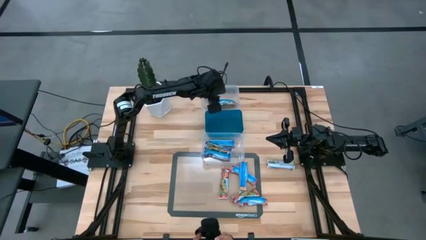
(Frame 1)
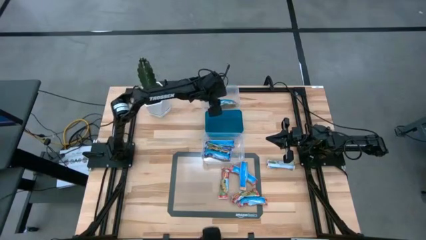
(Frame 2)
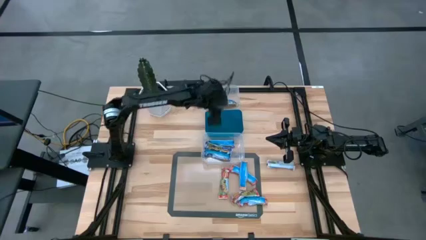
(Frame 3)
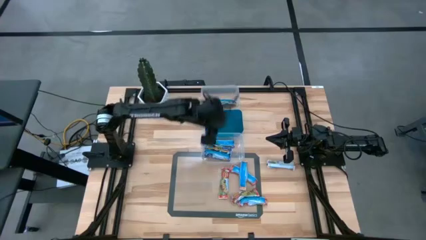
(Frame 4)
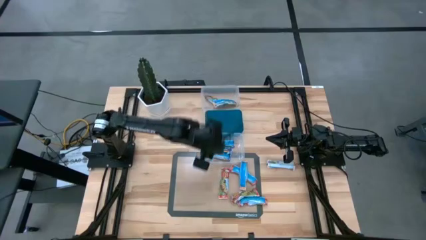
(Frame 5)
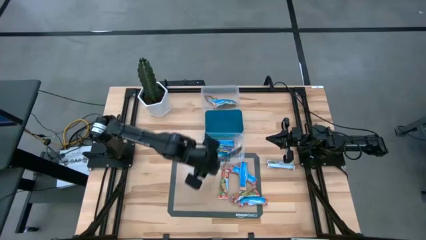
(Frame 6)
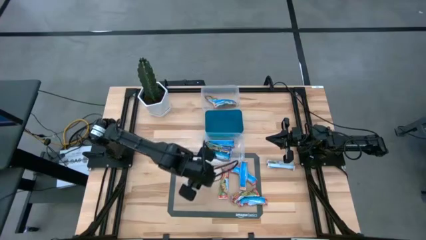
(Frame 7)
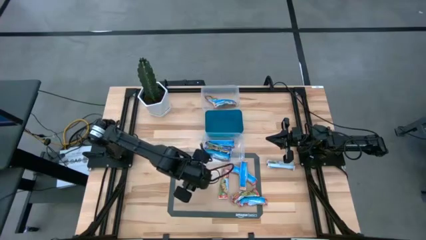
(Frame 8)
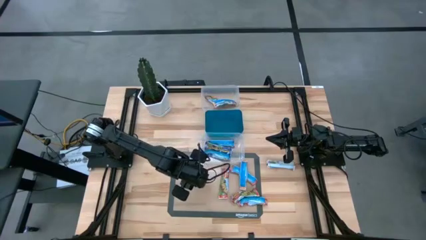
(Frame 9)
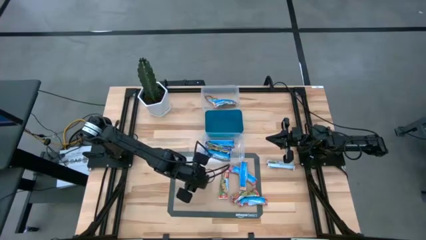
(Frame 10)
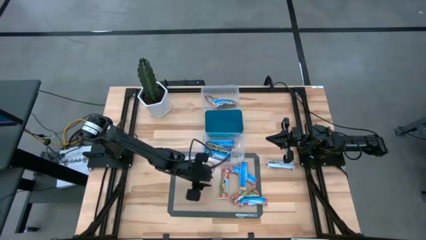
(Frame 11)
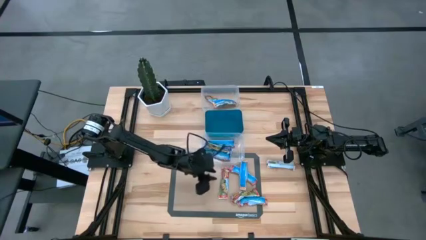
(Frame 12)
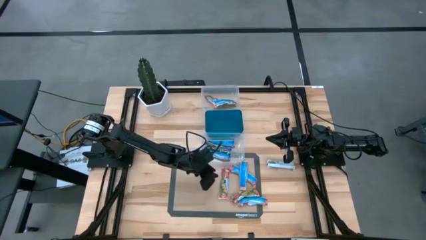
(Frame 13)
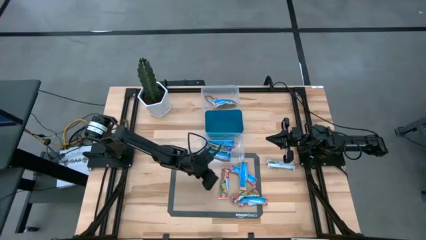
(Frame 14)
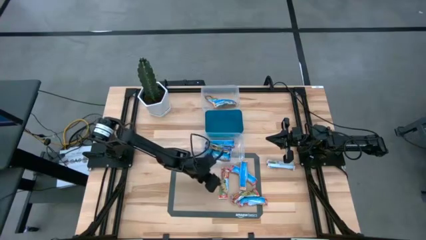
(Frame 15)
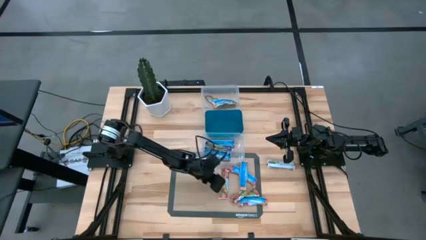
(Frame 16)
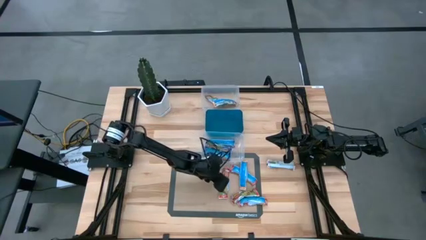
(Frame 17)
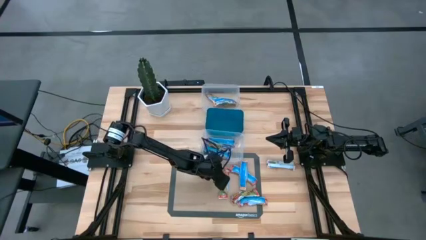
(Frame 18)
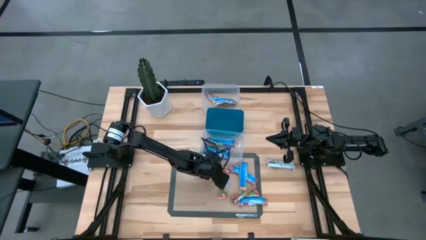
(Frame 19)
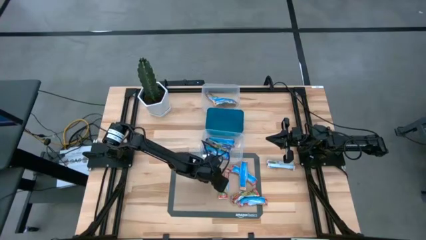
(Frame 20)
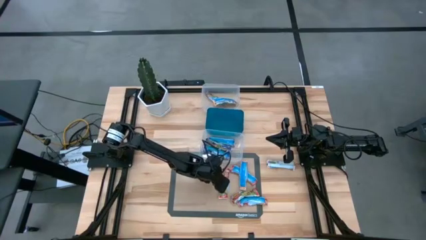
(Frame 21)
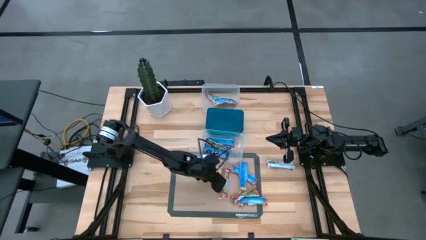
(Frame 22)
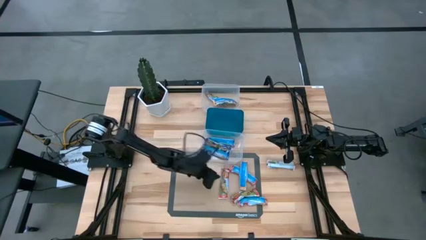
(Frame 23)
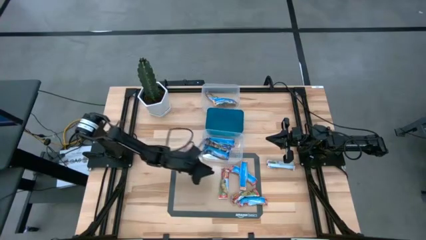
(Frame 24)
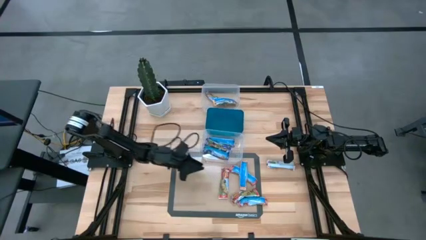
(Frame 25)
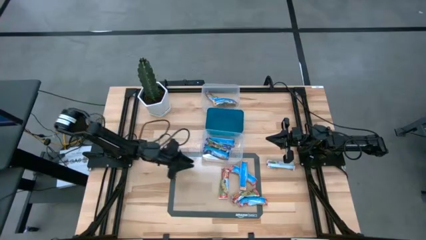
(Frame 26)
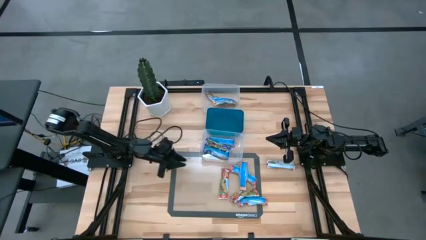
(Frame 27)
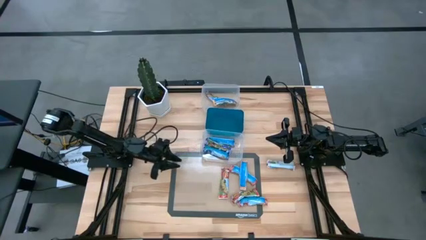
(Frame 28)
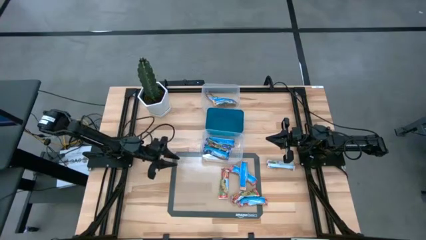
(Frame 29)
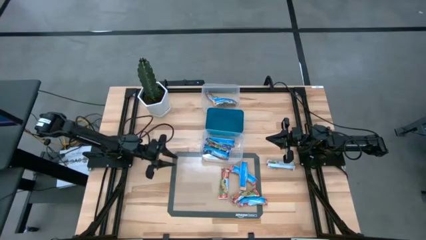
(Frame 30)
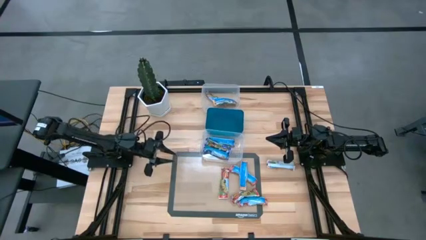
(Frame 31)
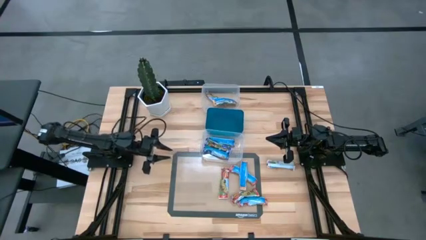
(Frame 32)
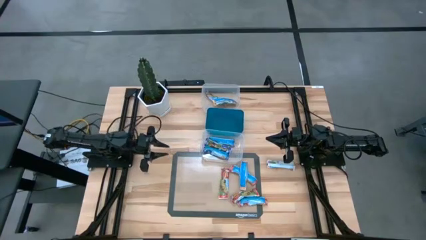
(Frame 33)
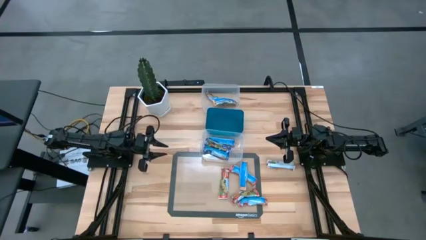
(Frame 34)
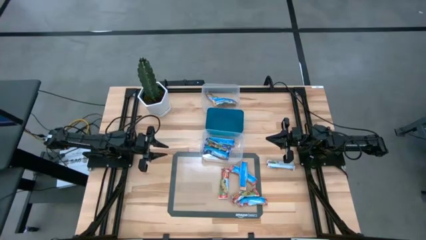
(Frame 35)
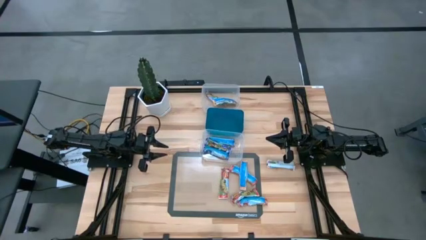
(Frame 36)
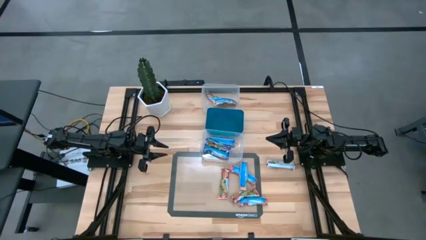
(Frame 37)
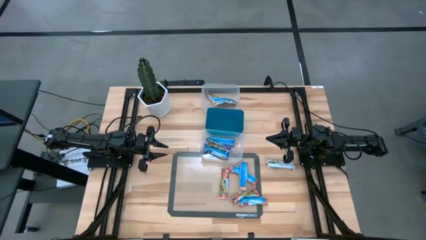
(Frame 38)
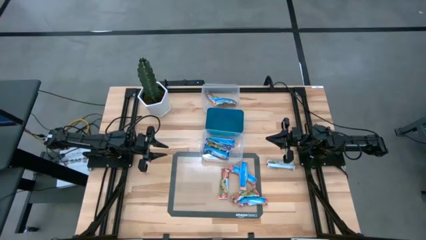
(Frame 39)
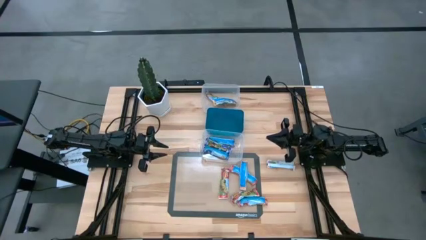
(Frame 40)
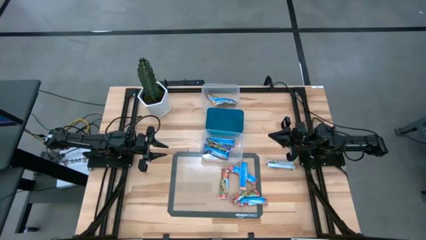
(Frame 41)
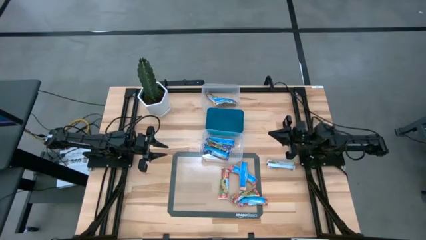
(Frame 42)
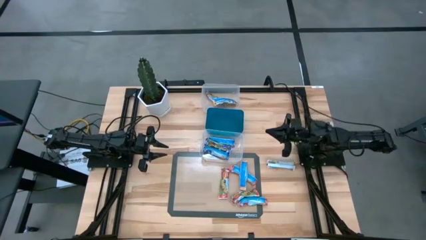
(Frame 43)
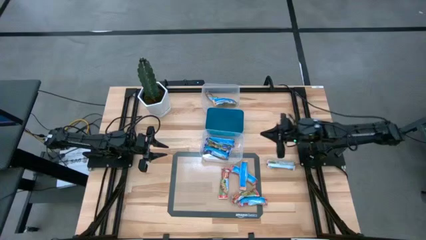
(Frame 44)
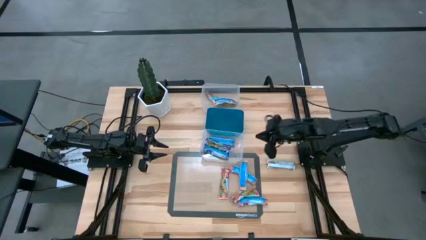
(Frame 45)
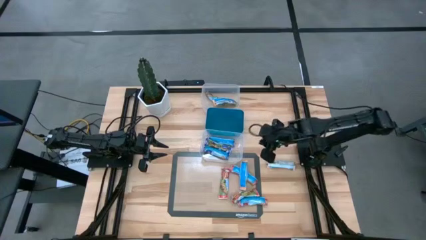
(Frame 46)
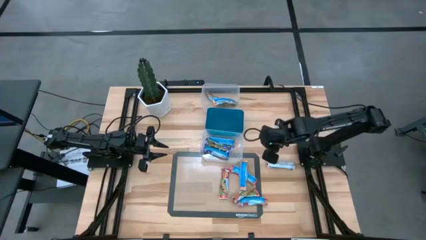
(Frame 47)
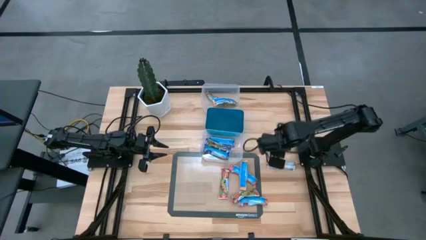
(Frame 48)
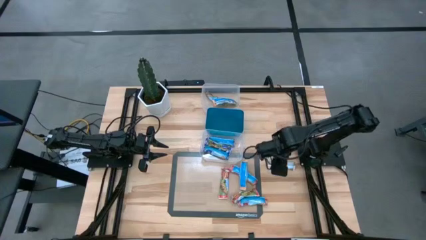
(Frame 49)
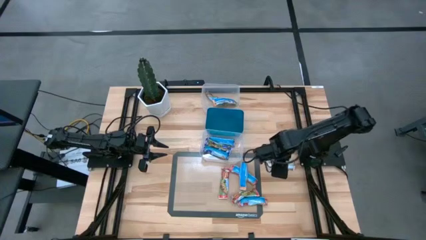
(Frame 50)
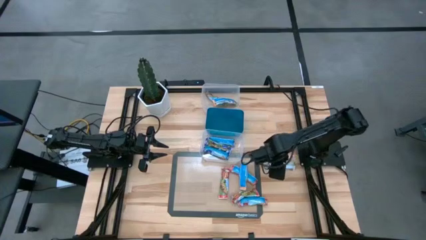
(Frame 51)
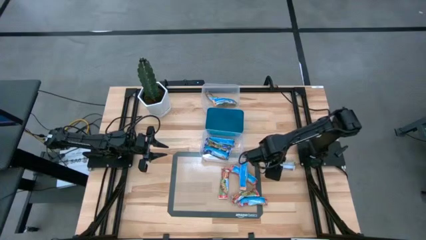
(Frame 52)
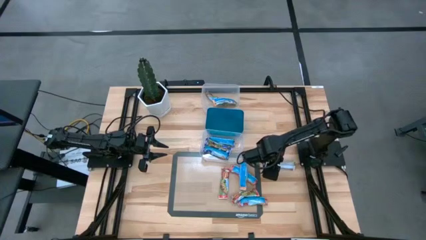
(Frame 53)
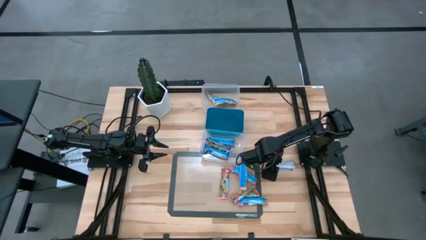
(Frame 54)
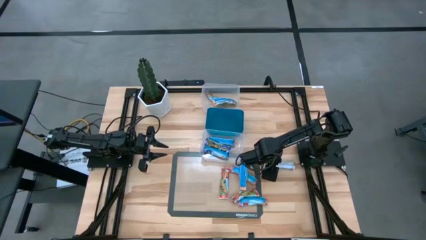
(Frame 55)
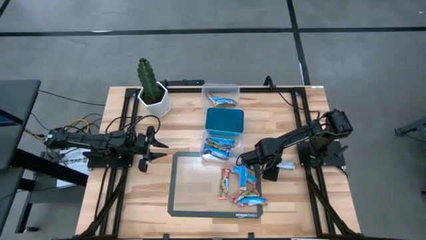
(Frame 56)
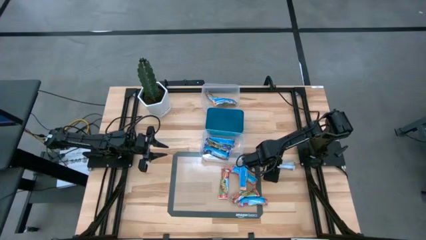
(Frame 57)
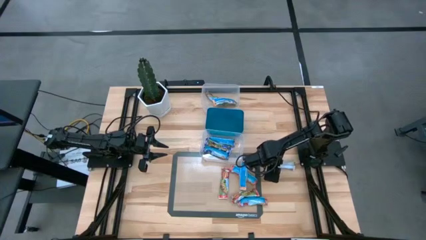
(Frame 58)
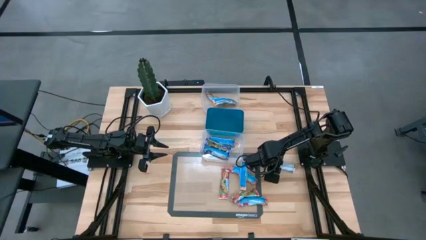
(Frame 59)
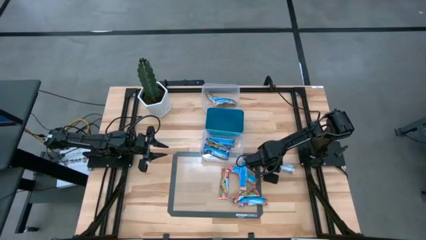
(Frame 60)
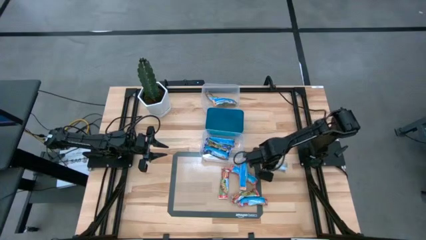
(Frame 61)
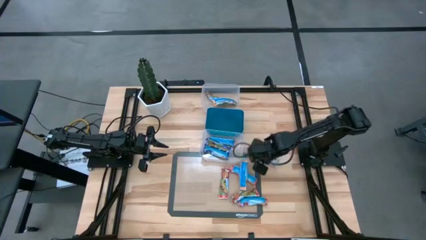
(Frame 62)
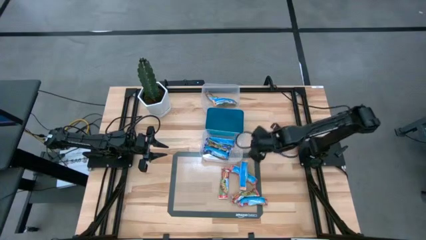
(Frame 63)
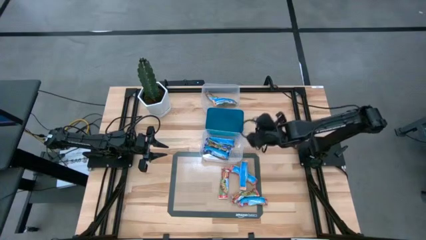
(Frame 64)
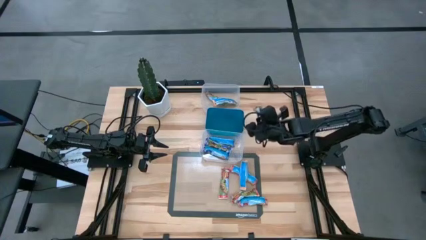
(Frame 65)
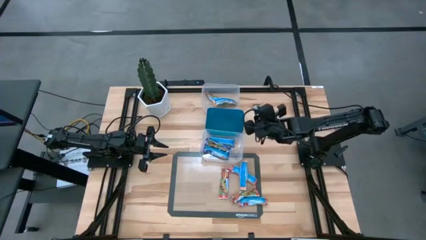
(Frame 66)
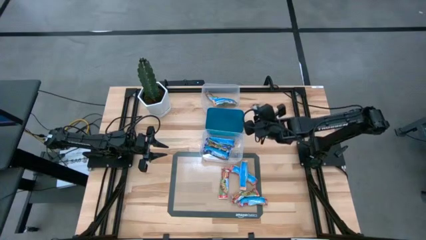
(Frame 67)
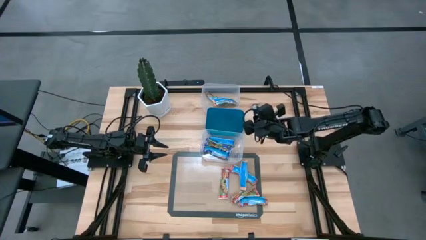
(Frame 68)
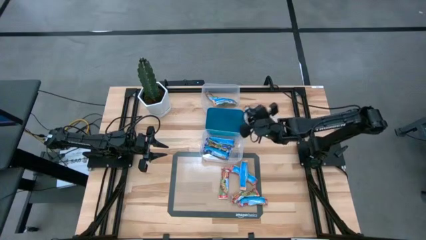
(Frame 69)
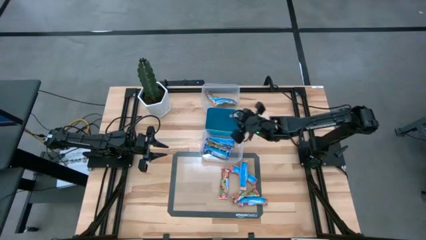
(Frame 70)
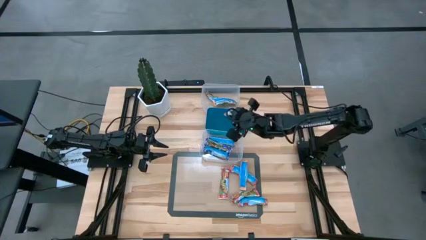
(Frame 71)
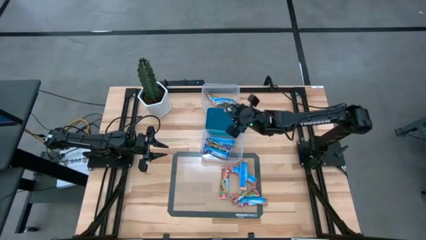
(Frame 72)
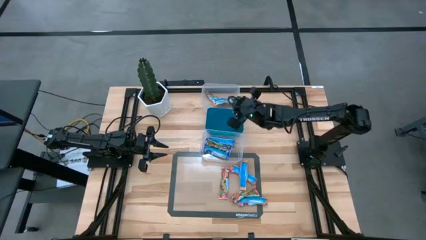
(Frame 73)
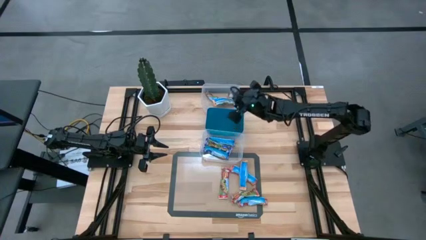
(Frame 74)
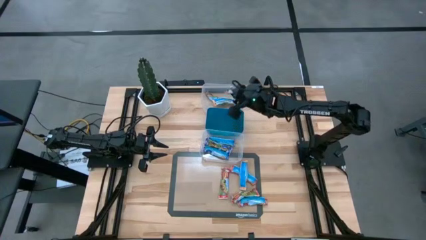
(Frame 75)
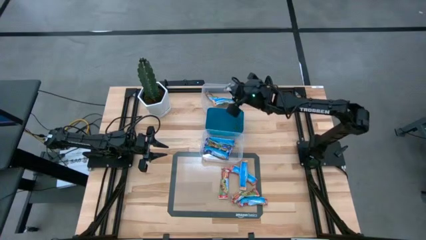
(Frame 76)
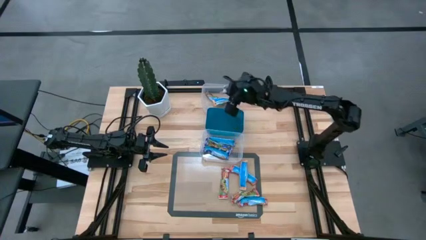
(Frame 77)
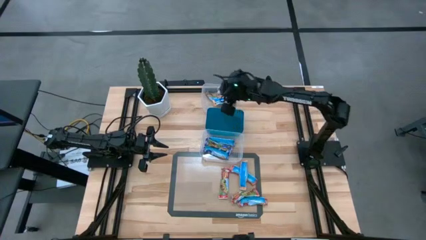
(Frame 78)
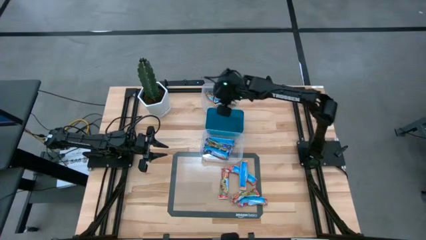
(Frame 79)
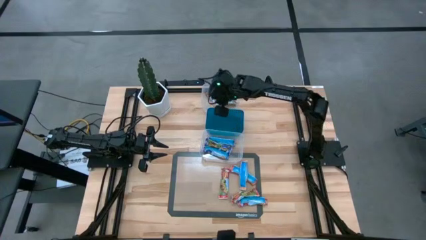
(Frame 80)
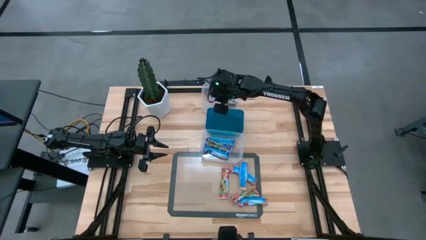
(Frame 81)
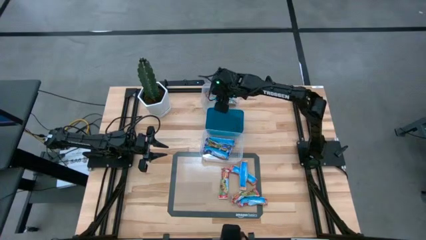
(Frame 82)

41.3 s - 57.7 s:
Task: Pick and place Granola Bars by type
Put the yellow granola bar into the top transparent bin
